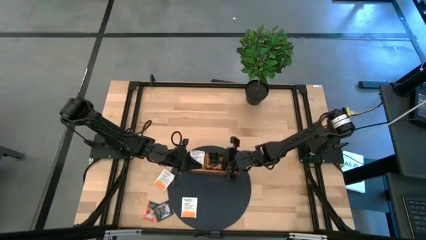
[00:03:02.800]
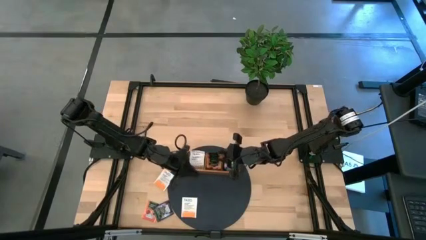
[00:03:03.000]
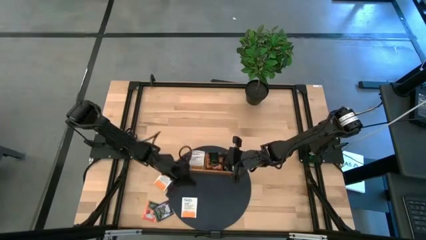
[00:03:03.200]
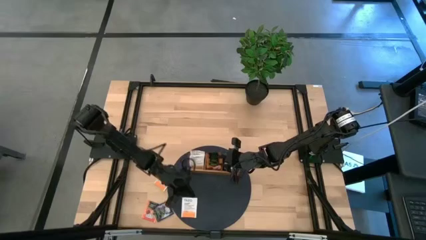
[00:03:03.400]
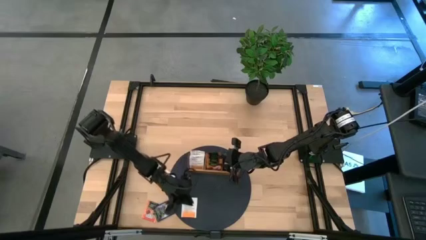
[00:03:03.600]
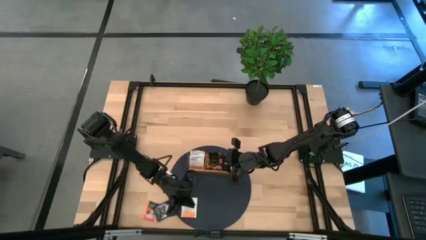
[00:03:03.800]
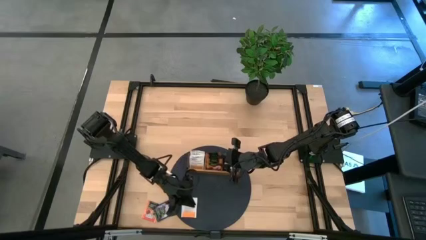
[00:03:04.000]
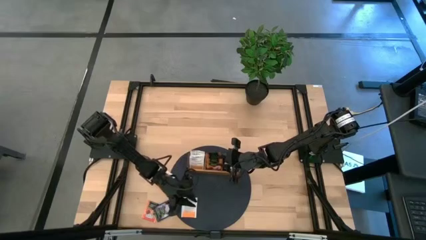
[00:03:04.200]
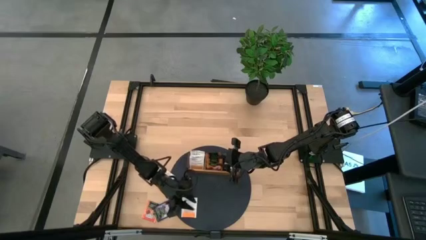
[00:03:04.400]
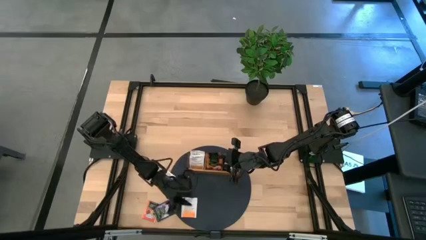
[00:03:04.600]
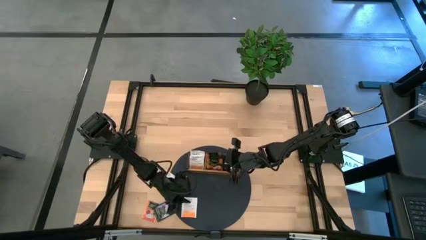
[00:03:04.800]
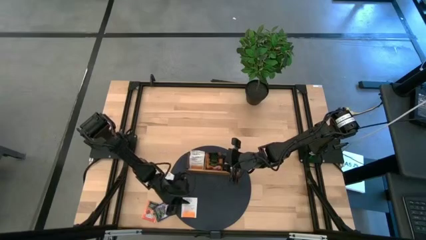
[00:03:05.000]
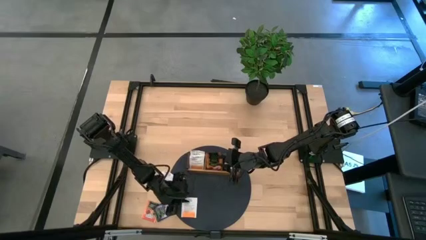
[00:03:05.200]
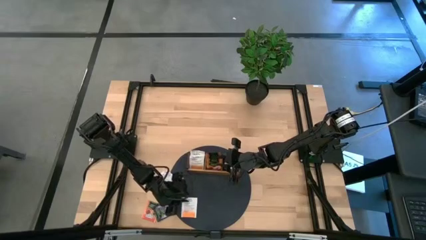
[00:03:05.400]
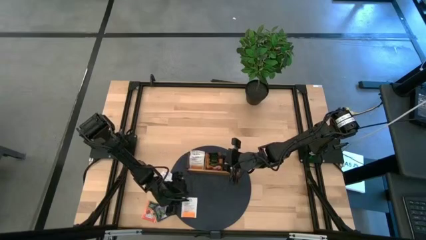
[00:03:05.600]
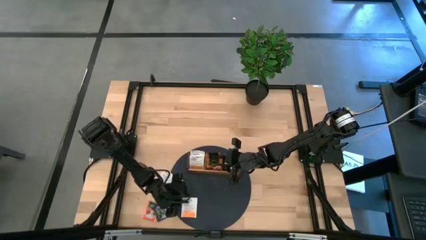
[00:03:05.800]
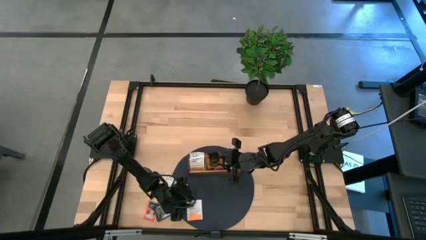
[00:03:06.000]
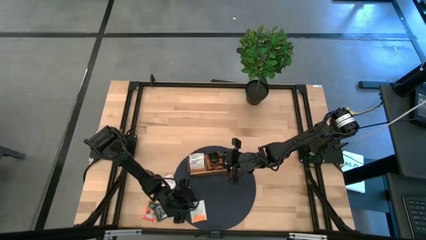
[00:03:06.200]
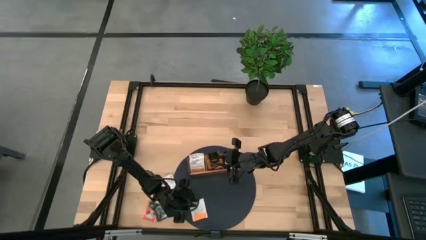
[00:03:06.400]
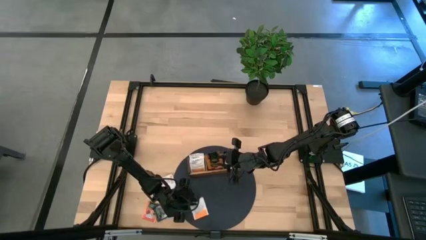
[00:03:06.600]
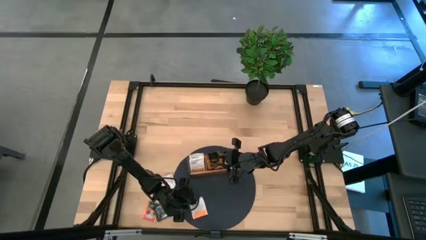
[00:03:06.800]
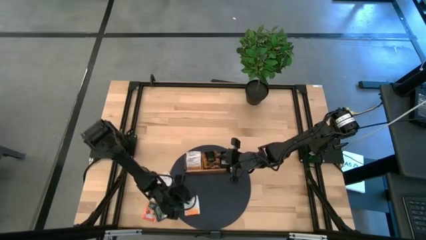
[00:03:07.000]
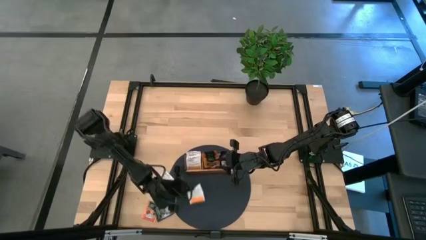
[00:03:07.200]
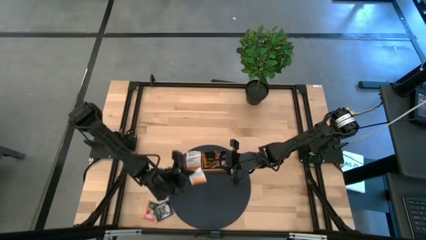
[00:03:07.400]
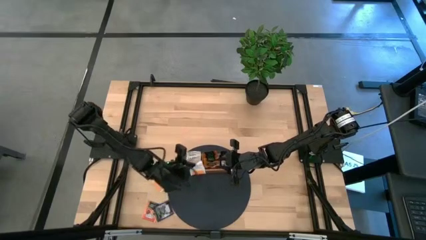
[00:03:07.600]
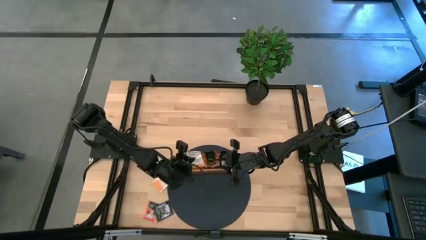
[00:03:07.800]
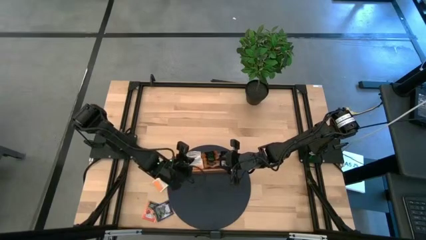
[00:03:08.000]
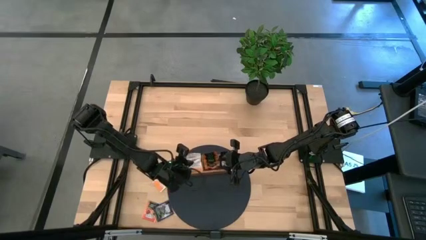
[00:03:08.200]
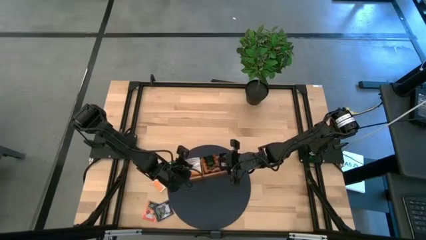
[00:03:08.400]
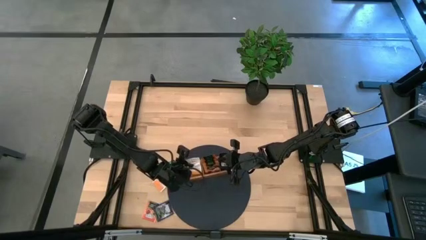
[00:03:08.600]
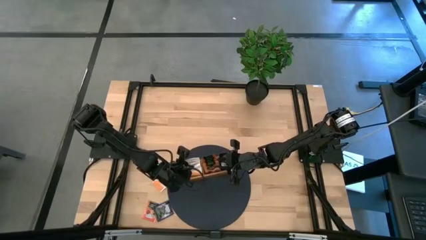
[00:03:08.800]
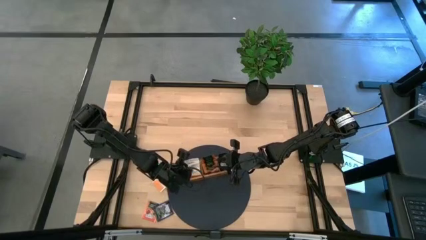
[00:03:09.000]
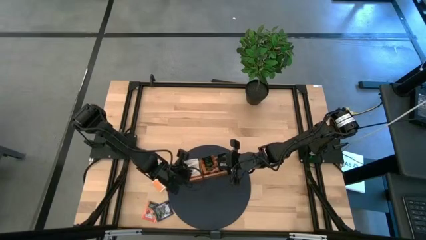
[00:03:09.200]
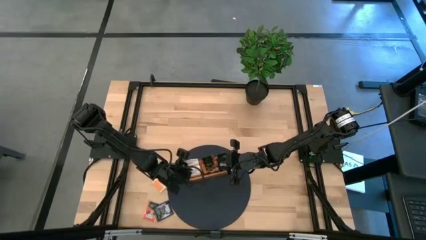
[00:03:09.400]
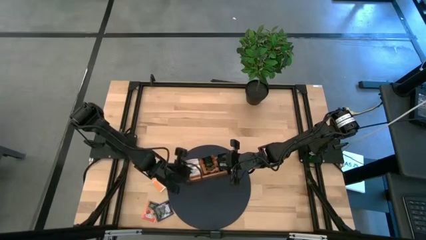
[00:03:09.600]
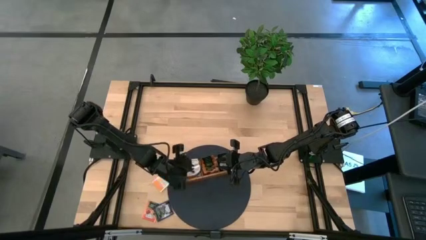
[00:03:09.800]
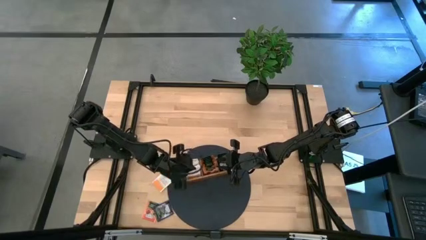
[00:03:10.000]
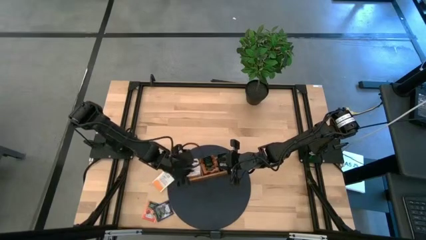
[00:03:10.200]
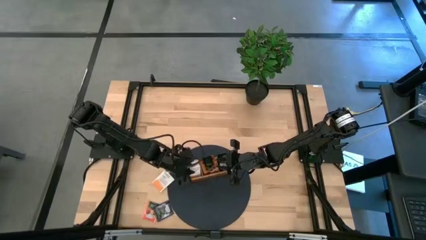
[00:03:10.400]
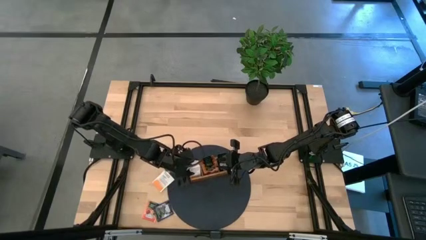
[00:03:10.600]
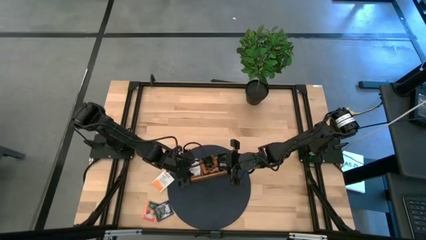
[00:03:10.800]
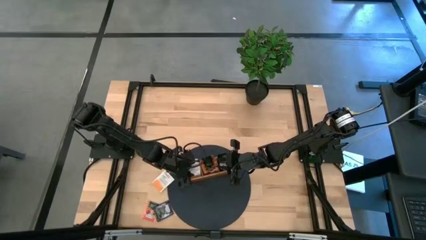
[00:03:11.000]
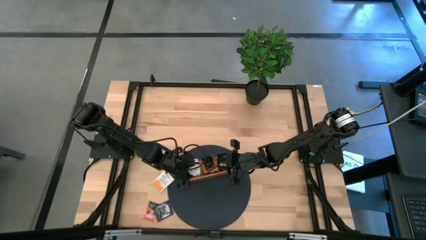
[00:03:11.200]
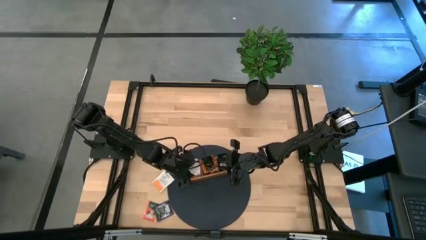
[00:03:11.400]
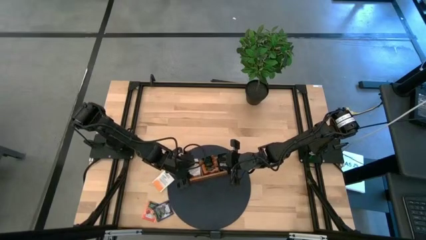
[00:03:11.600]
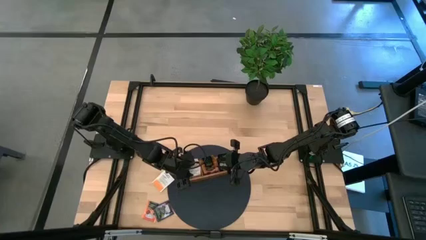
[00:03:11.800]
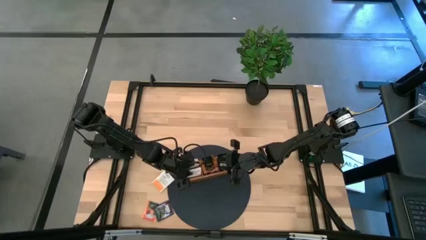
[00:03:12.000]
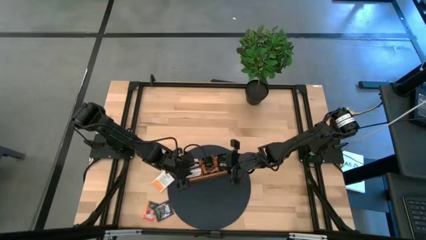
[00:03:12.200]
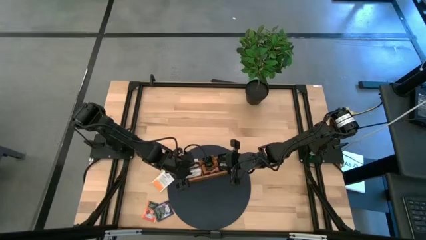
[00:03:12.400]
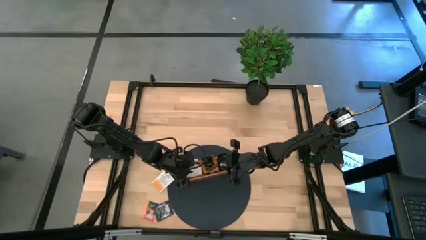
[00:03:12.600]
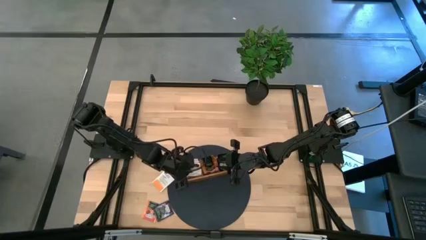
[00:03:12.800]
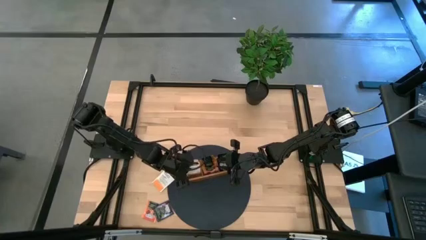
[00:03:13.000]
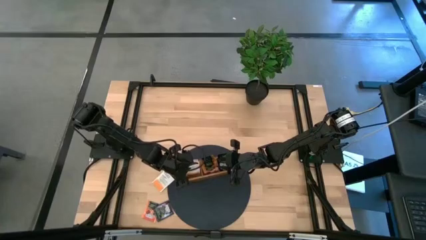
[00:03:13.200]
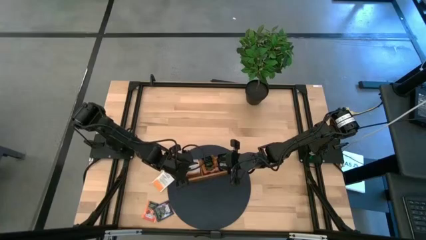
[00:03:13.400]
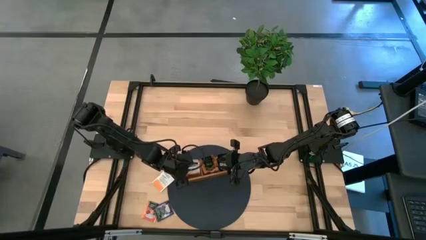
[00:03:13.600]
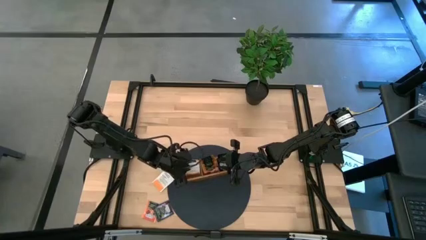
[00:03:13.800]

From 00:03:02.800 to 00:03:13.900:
Task: Pick & Place Tea
Put the white orange tea bag into the left section of the wooden organizer

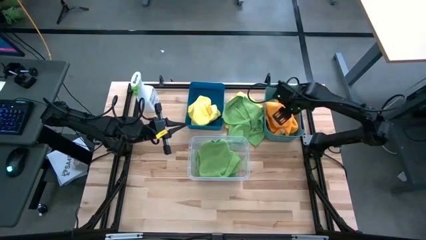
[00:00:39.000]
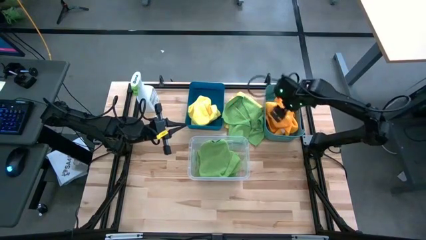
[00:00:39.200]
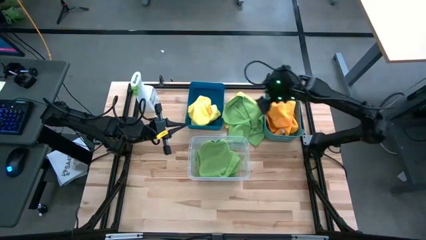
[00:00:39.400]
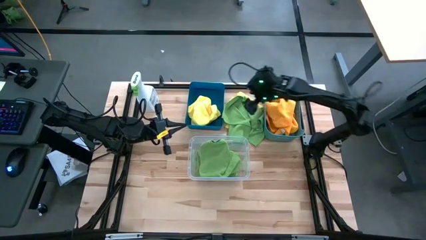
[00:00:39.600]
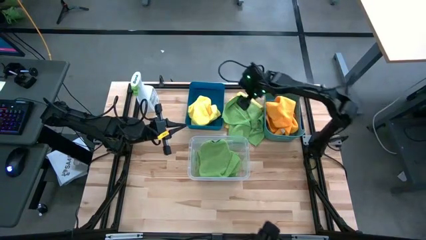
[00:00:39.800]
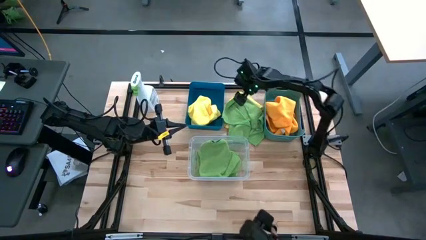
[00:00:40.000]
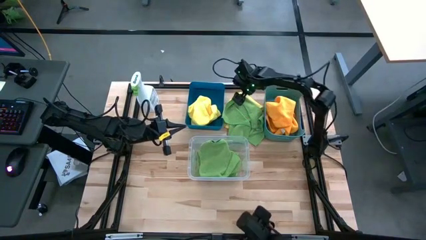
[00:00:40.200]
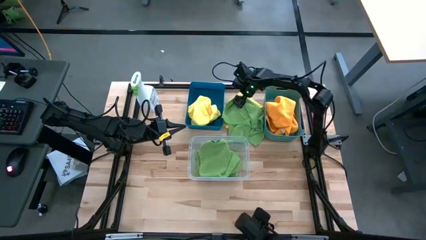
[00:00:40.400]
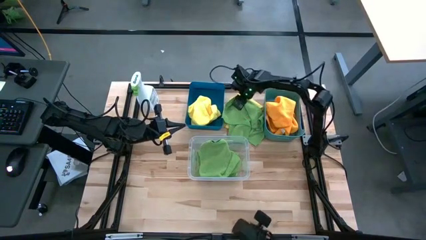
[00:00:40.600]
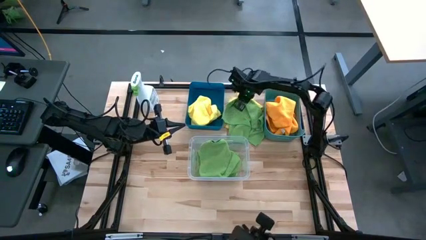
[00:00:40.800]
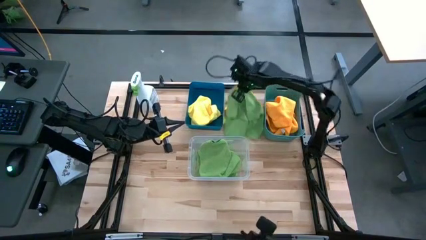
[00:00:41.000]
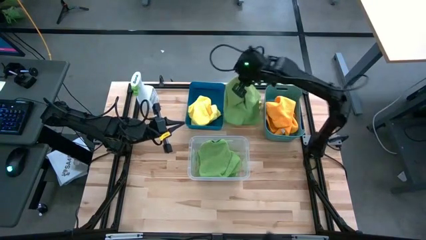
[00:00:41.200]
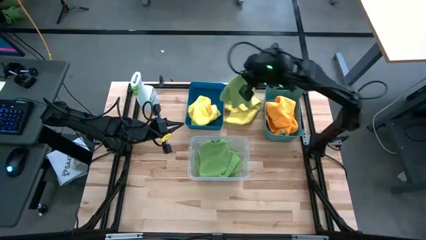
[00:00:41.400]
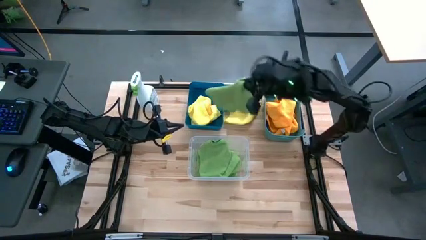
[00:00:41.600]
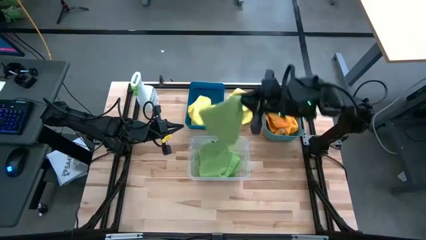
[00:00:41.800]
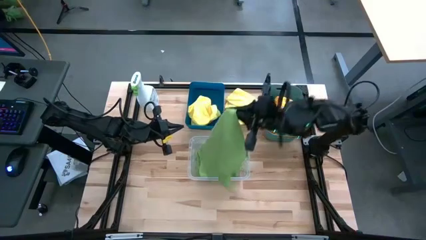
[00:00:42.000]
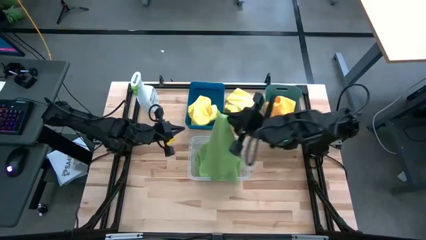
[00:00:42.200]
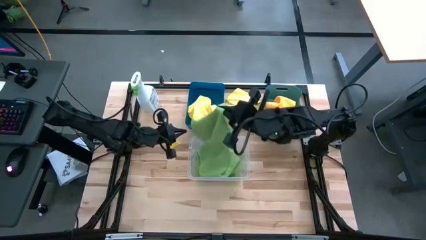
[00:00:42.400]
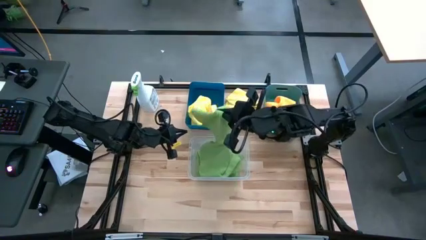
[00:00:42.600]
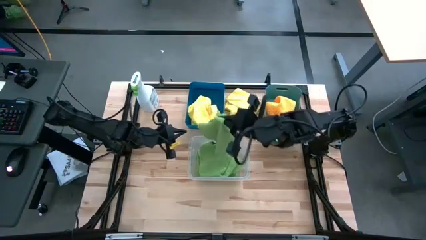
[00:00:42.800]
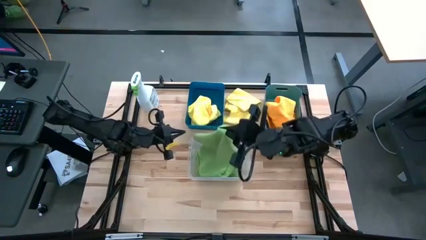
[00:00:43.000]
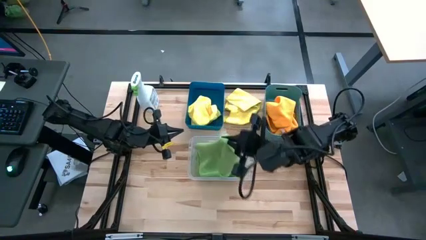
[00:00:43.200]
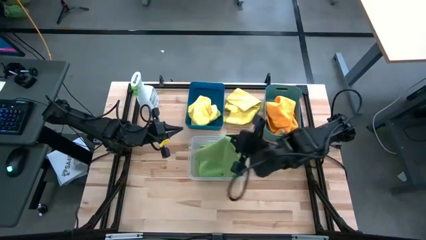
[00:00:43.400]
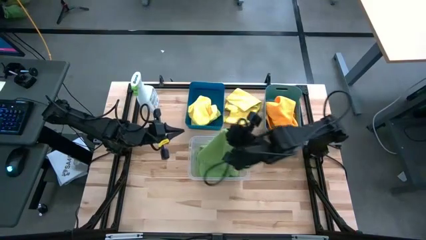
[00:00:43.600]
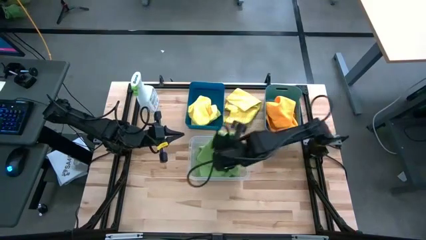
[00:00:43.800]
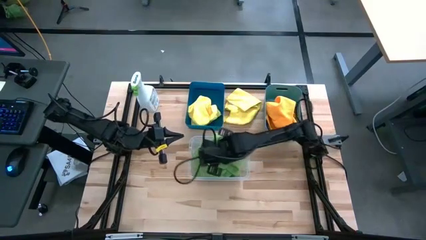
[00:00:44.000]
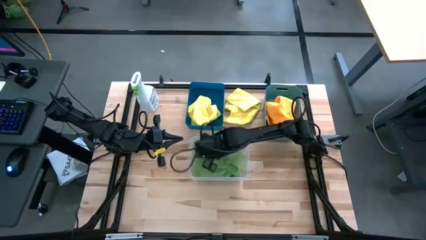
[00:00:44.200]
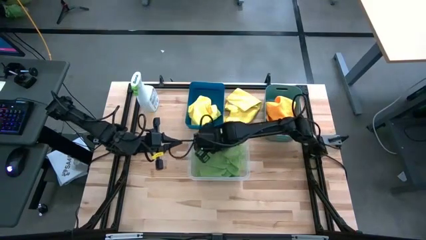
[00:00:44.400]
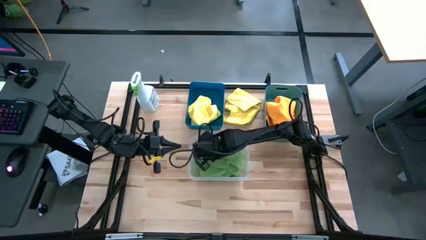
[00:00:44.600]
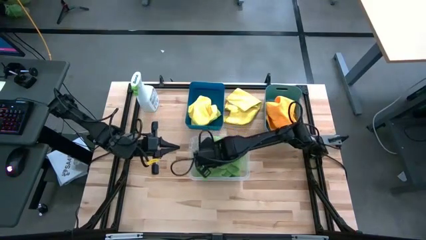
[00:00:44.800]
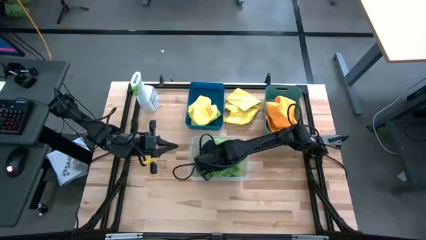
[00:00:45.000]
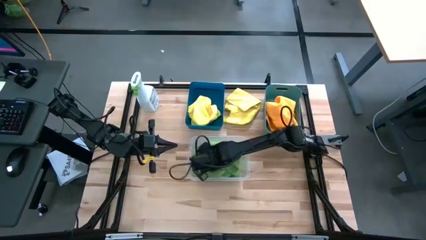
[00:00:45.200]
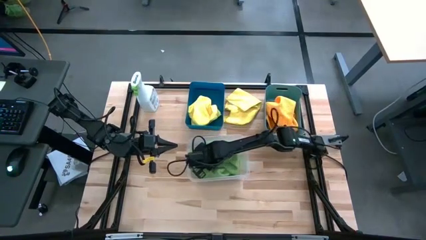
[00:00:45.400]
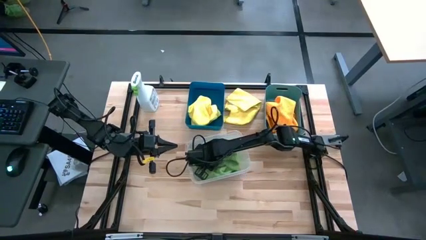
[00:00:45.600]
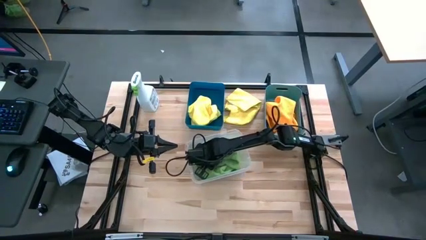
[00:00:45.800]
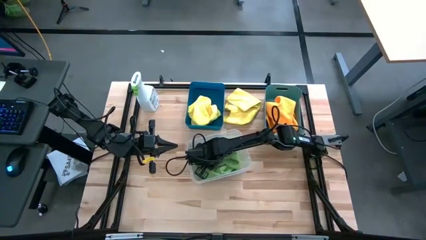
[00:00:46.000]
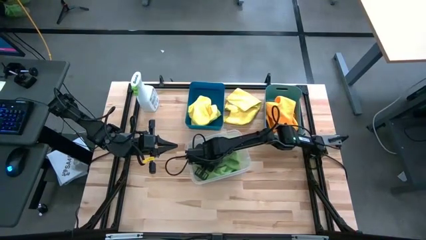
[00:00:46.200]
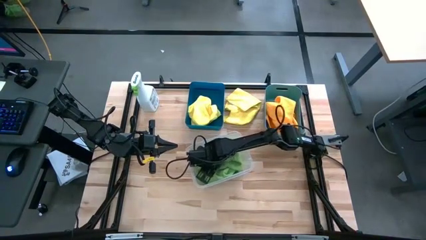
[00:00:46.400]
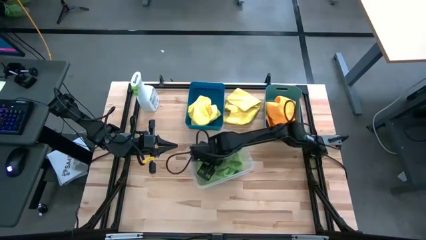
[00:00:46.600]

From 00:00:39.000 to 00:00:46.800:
Task: Sort microfiber towel by color & place in baskets
Put the green towel into the transparent bin
